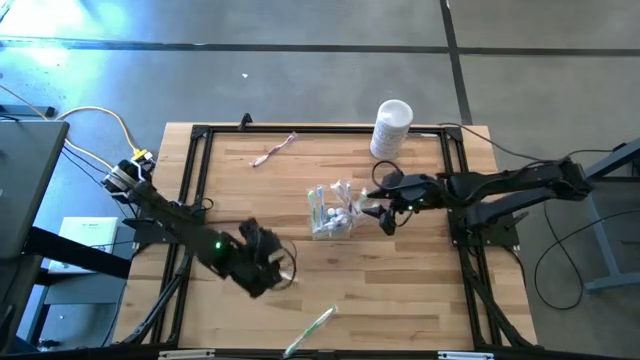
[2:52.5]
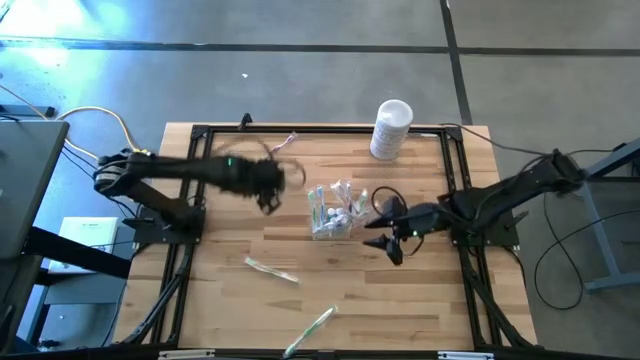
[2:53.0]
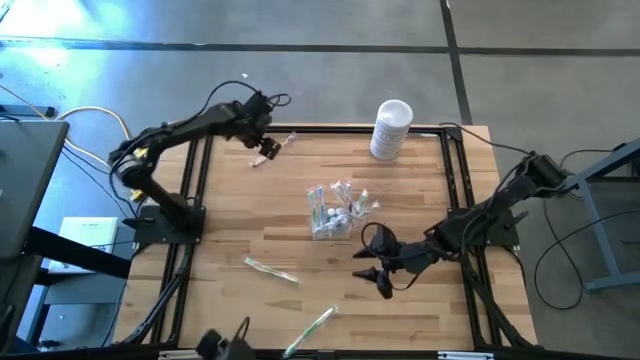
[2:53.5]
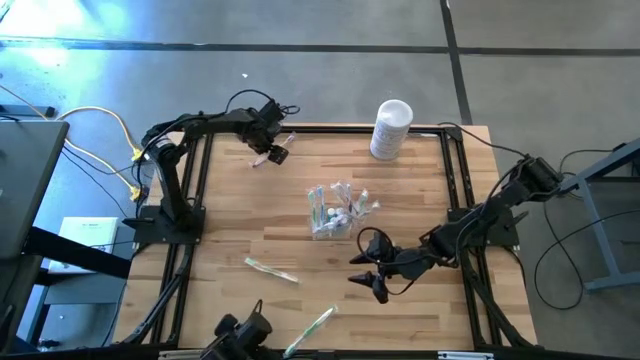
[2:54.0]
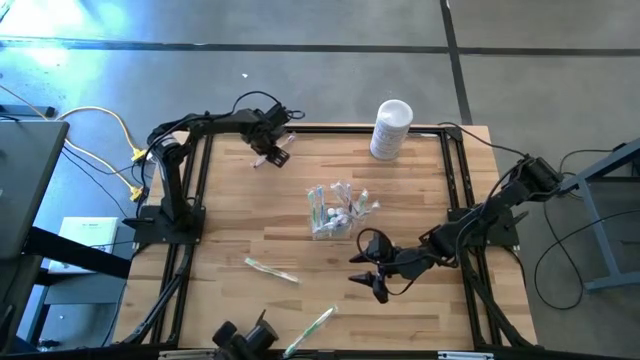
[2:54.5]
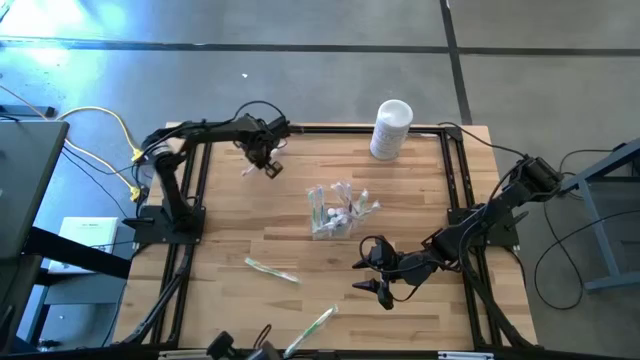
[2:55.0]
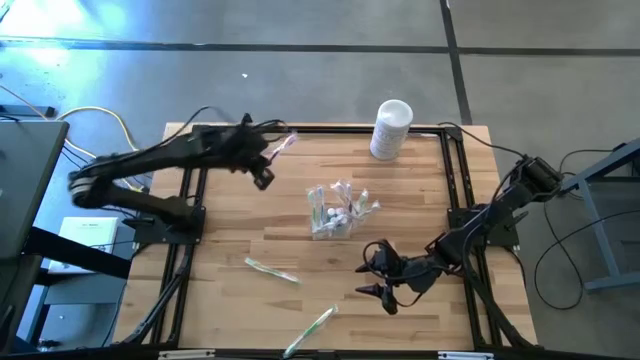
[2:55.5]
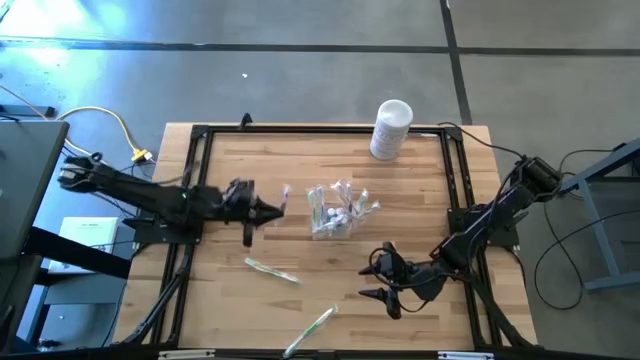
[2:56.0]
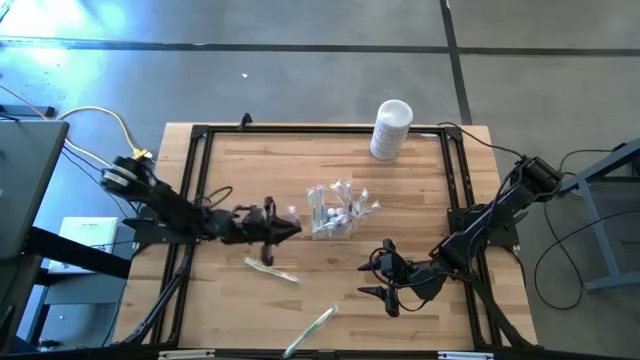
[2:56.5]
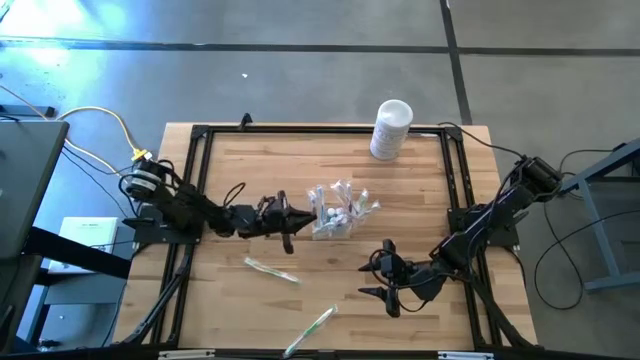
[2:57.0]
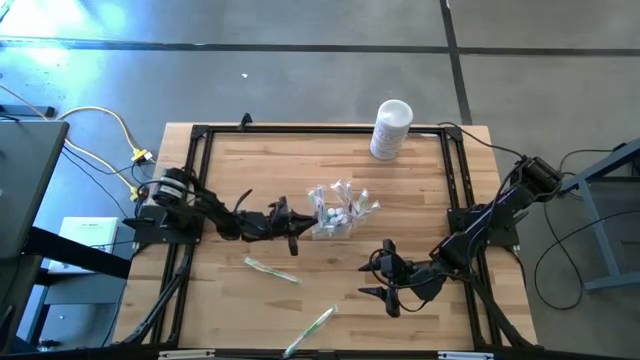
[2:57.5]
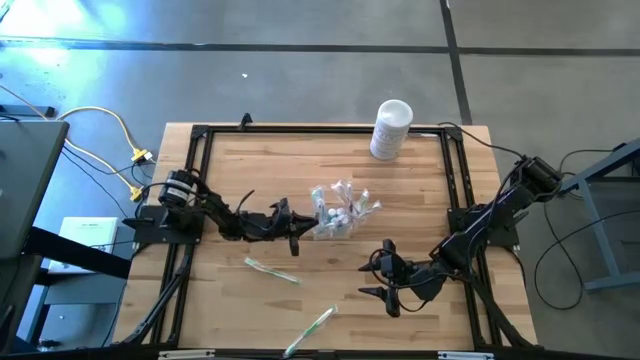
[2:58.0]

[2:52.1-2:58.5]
Task: Pick & Place toothbrushing station
Put the violet toothbrush into the transparent organizer

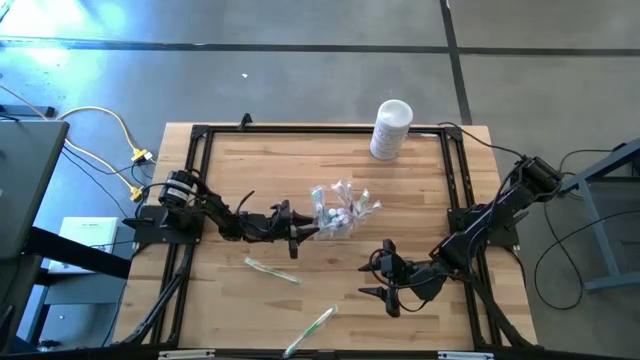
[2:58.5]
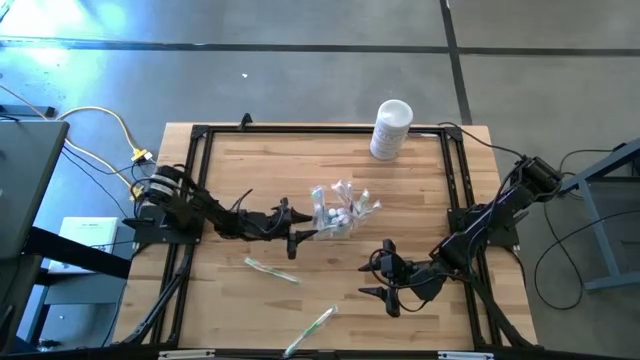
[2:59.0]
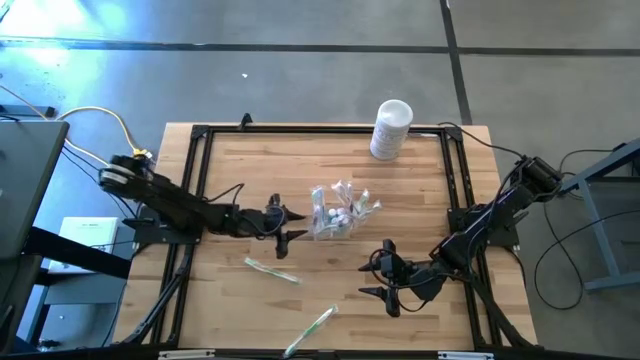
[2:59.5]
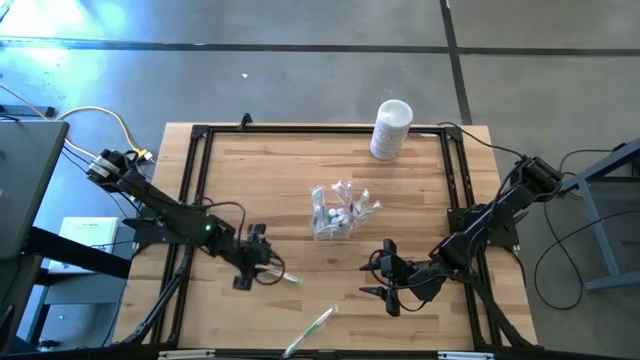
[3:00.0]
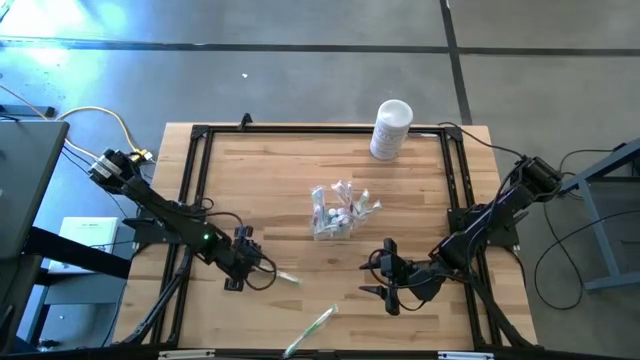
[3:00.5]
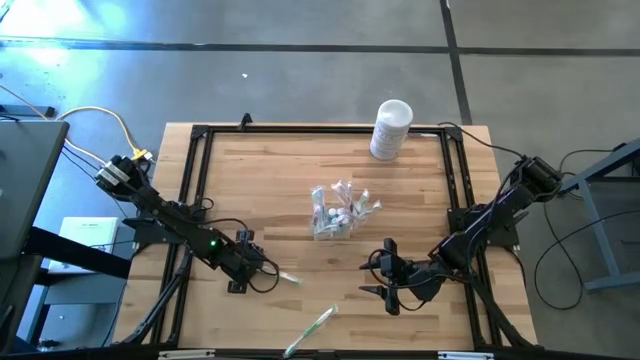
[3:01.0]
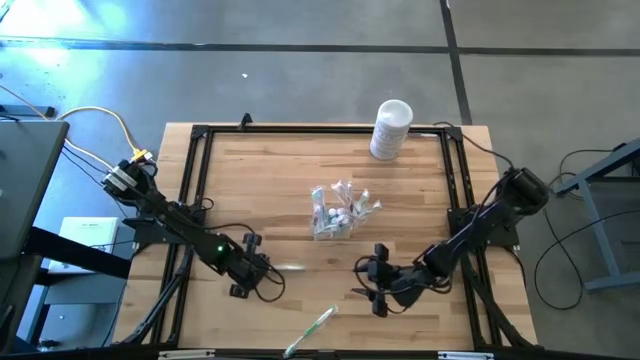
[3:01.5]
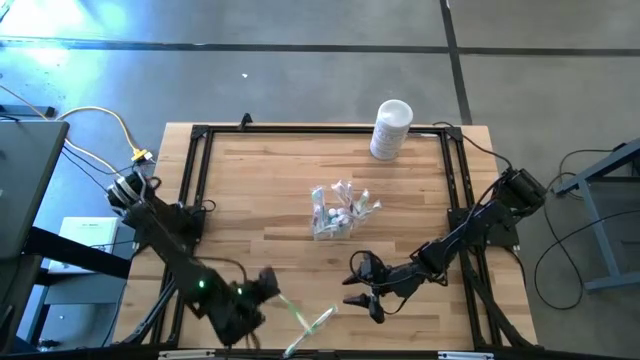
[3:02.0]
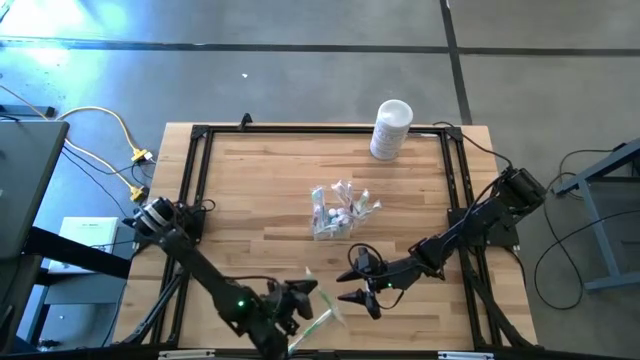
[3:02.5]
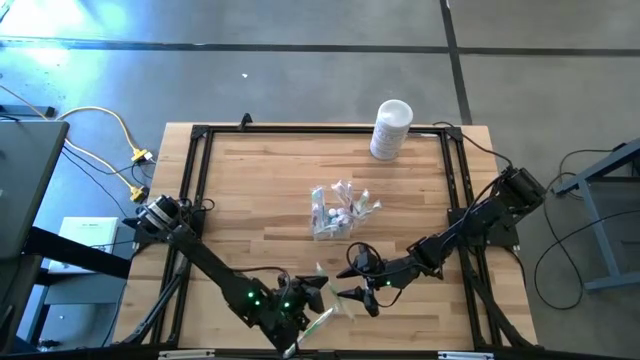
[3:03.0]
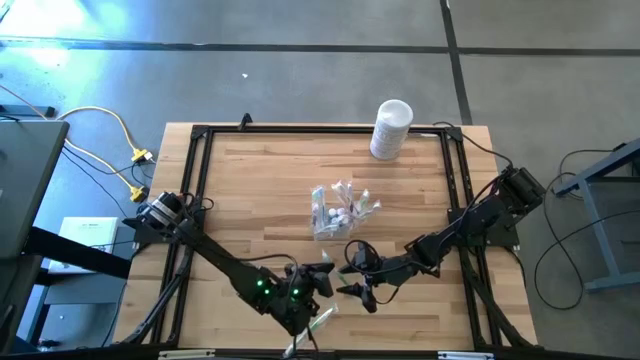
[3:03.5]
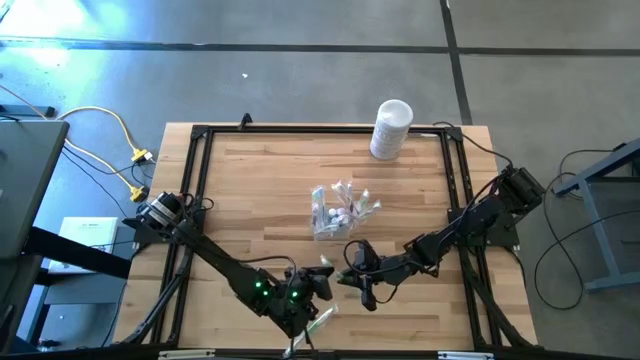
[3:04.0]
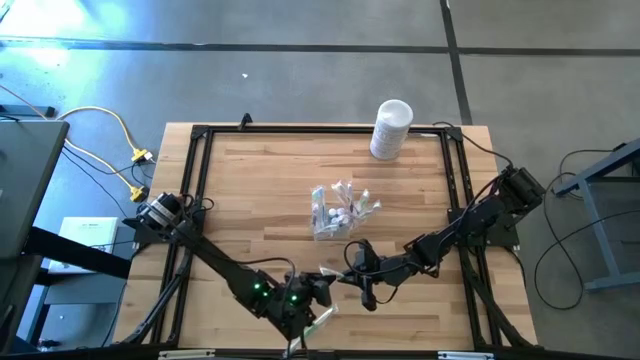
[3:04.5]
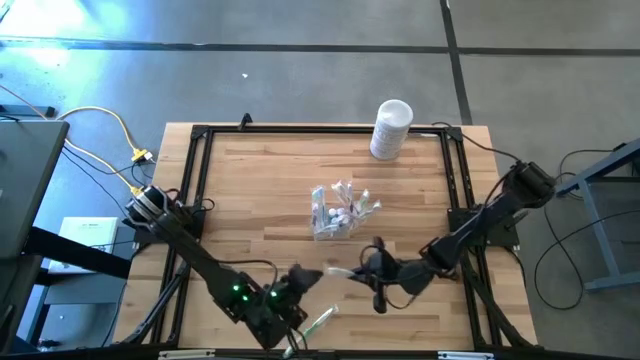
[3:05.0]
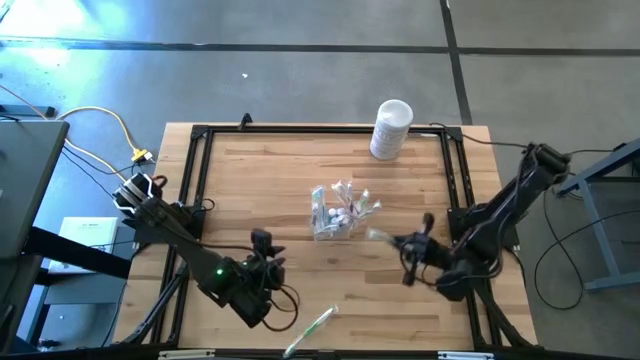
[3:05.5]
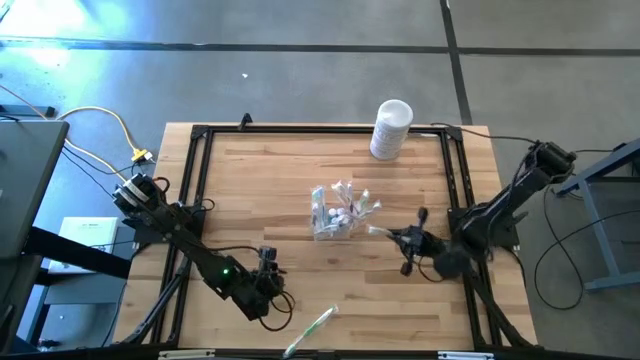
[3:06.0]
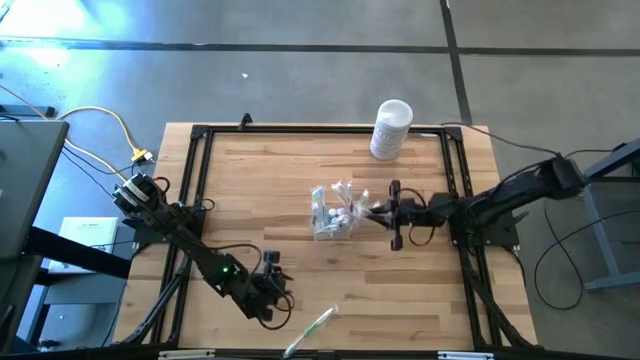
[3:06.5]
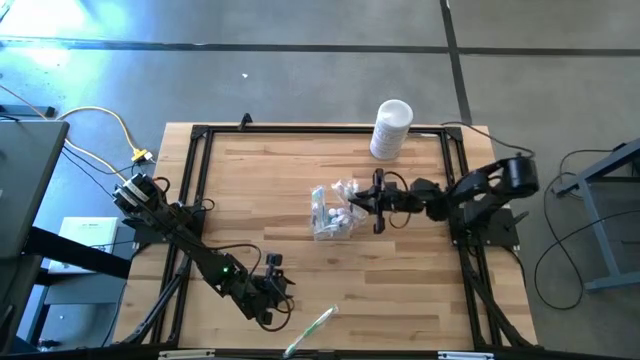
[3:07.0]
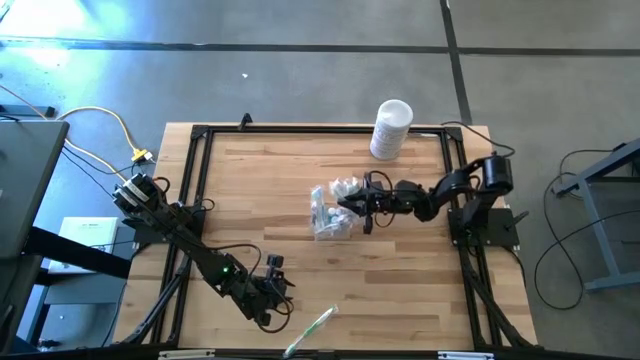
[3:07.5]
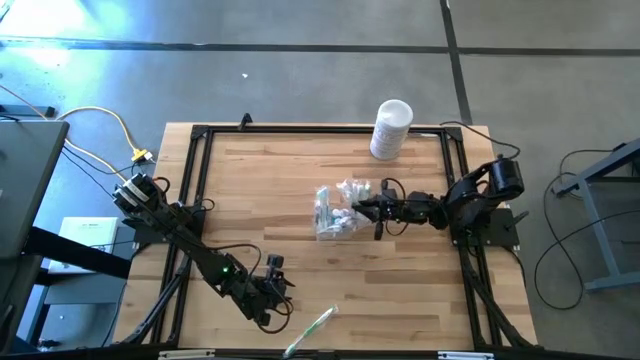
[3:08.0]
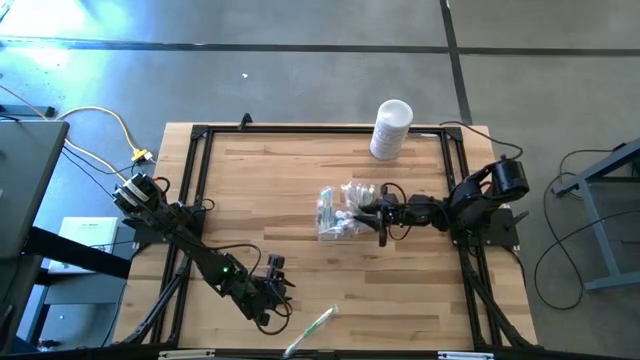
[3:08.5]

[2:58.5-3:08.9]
Put the green toothbrush into the transparent organizer

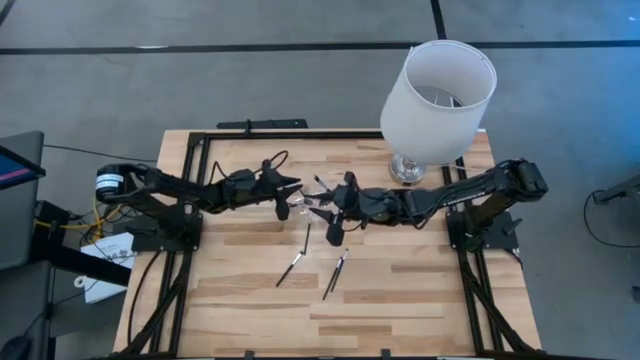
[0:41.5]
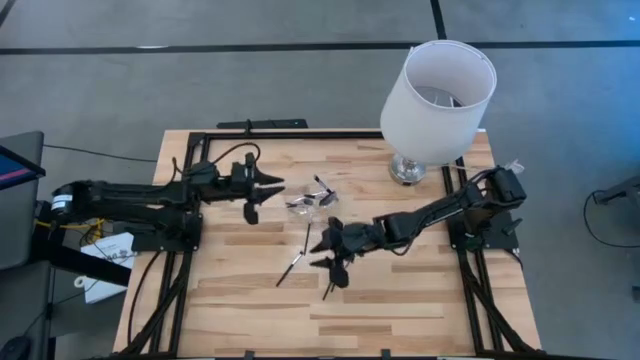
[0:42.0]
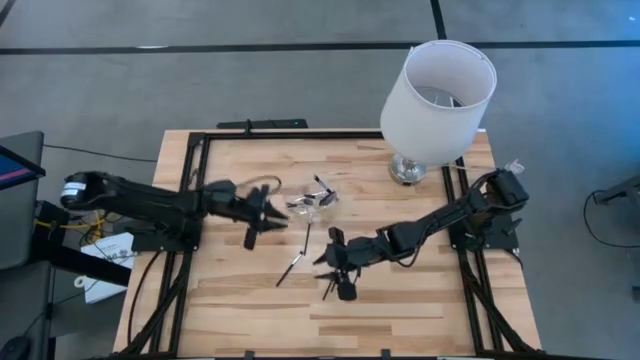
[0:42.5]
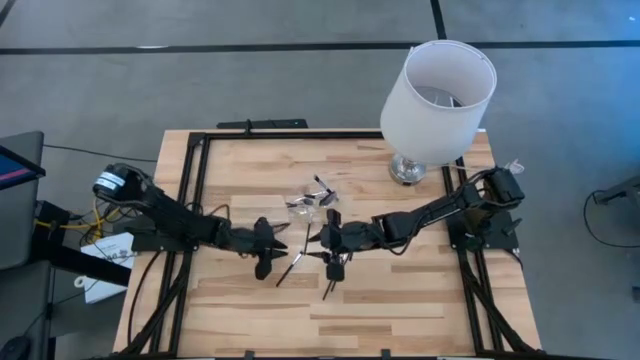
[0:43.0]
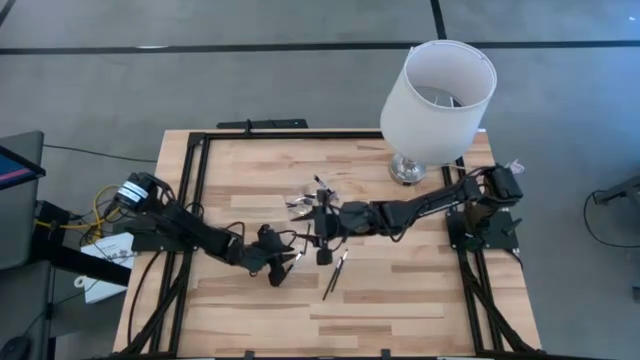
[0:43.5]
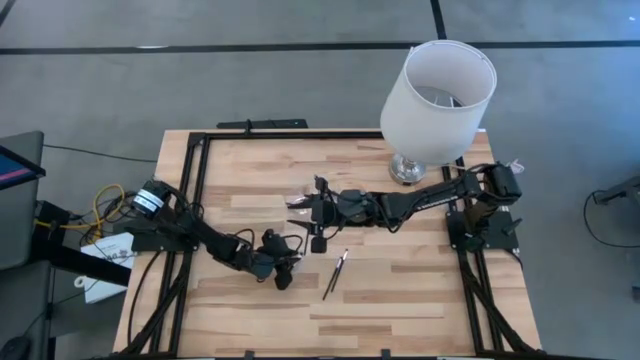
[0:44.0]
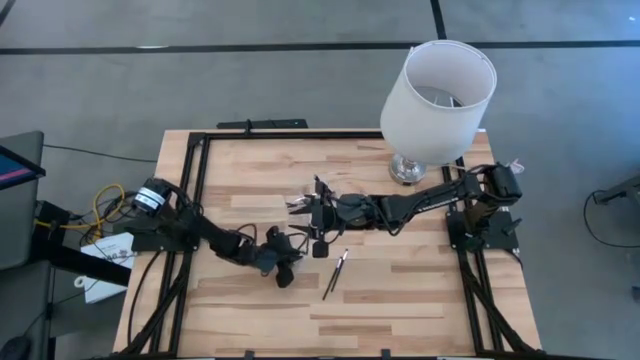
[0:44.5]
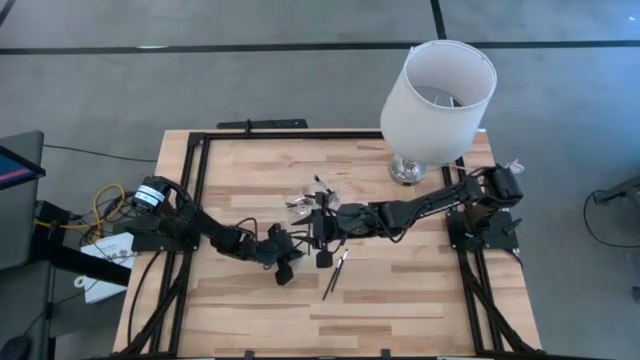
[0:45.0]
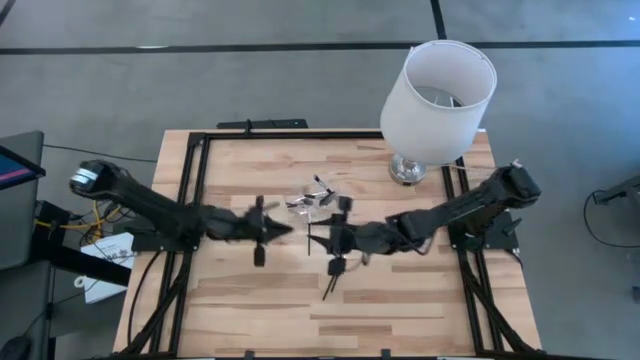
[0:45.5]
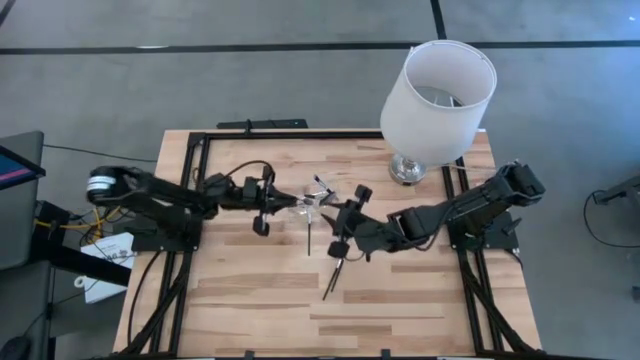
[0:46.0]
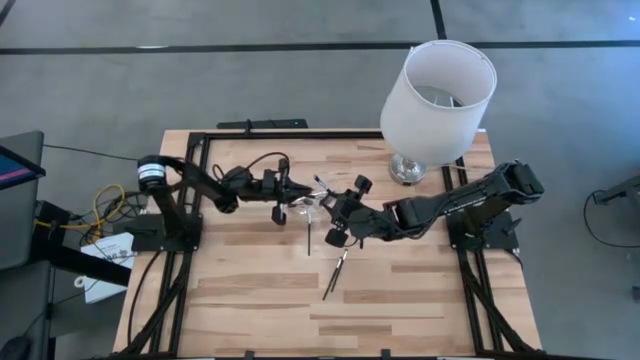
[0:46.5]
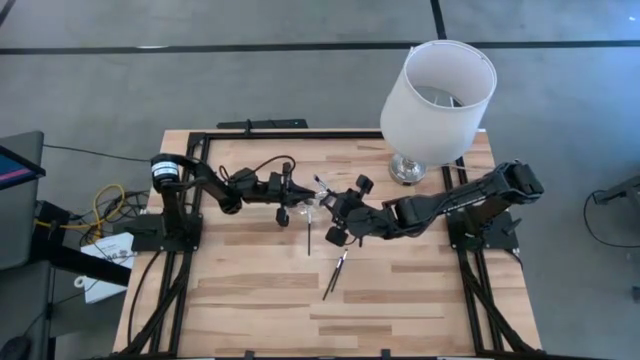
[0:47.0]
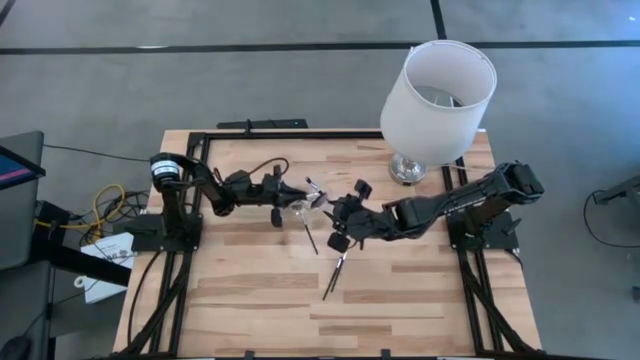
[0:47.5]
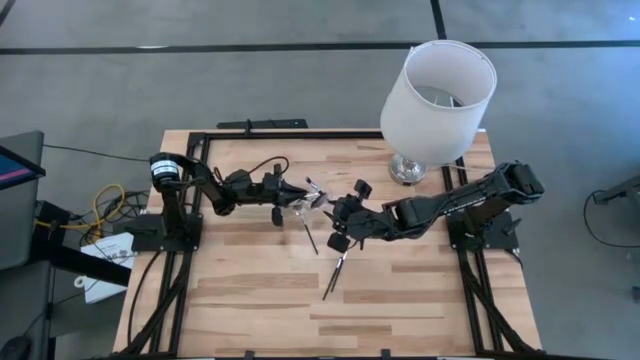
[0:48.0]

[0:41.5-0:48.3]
Task: Pick & Place Makeup Supplies
Put the black makeup brush into the transparent organizer
